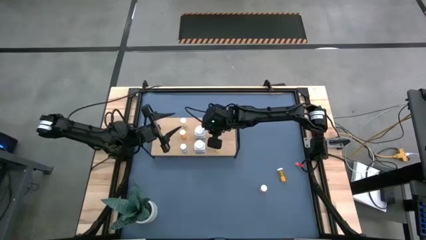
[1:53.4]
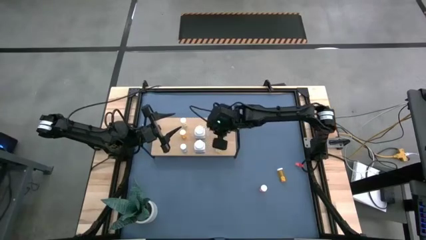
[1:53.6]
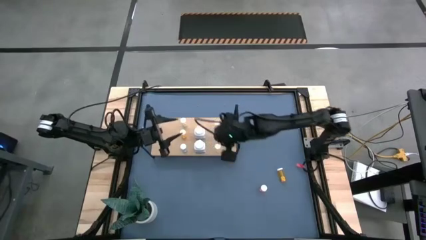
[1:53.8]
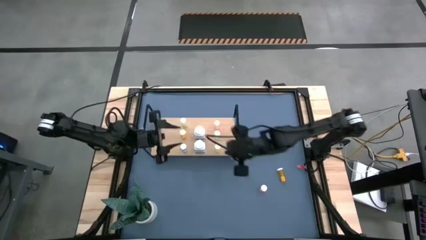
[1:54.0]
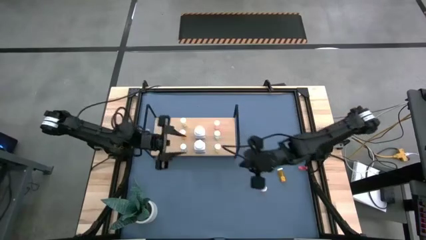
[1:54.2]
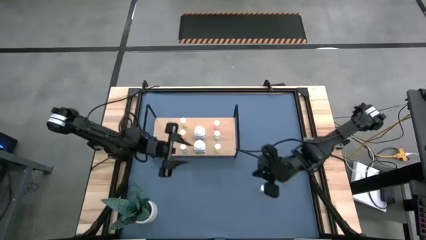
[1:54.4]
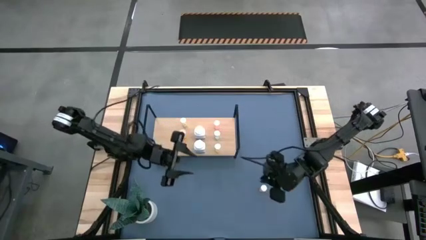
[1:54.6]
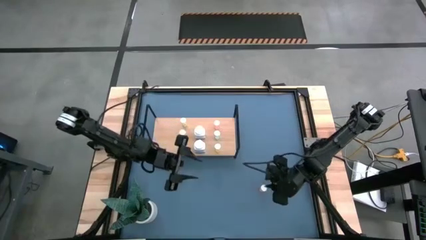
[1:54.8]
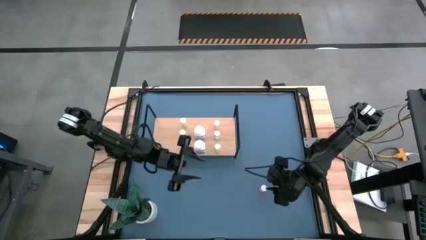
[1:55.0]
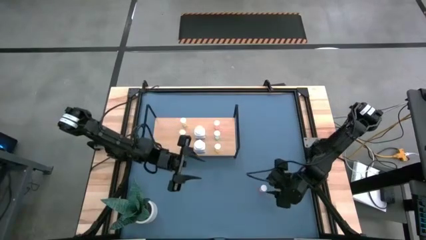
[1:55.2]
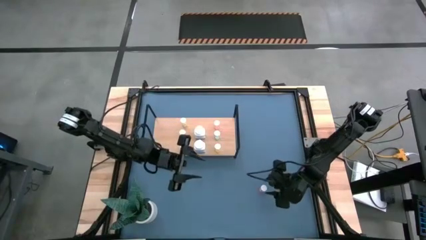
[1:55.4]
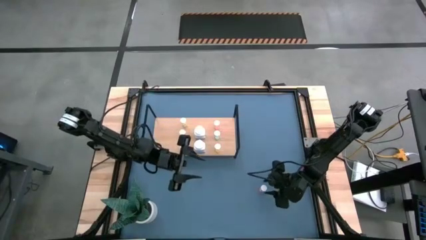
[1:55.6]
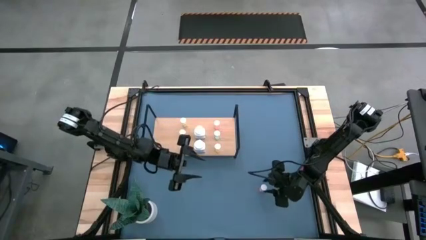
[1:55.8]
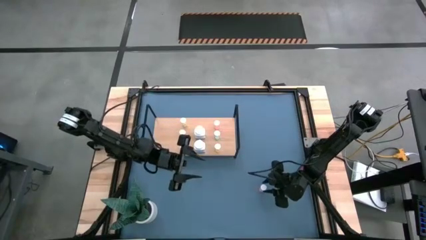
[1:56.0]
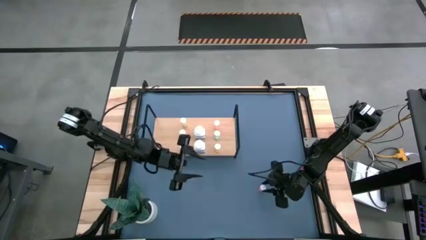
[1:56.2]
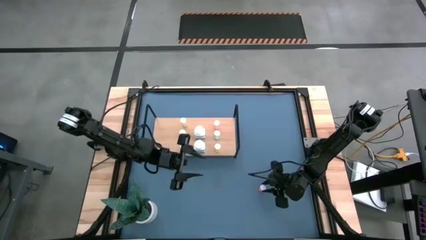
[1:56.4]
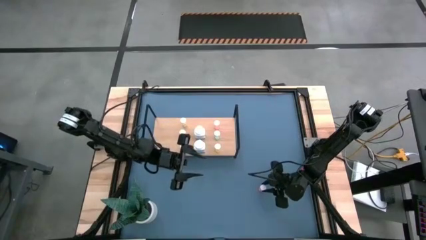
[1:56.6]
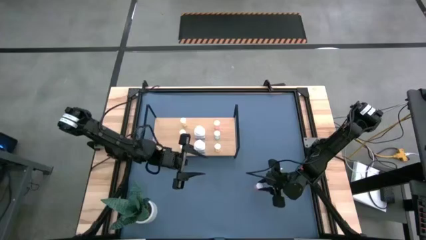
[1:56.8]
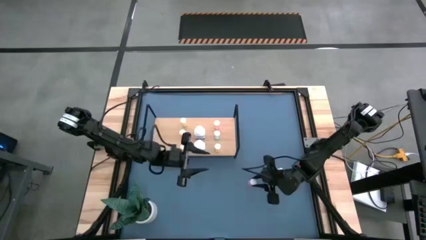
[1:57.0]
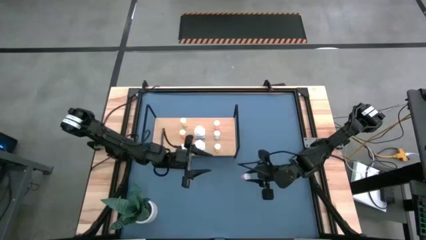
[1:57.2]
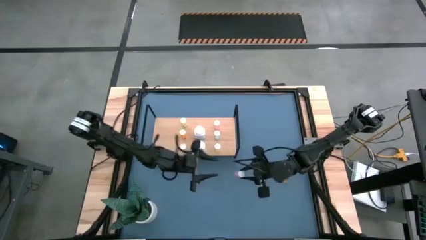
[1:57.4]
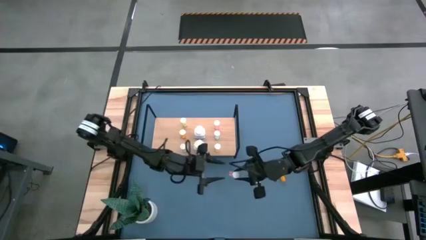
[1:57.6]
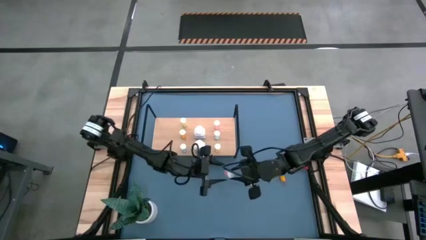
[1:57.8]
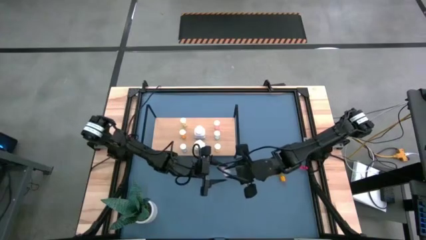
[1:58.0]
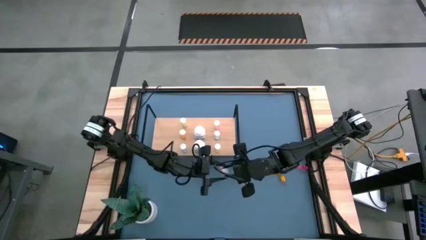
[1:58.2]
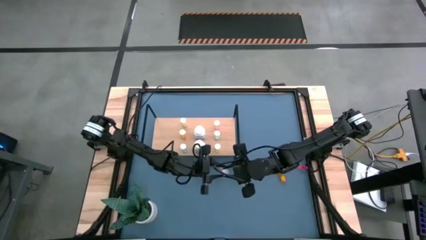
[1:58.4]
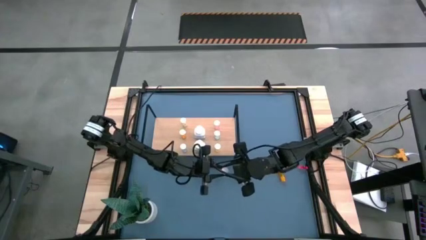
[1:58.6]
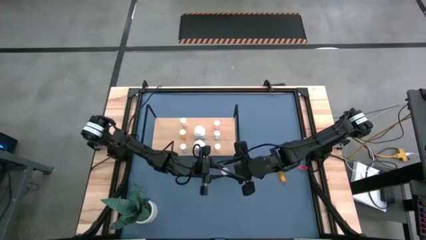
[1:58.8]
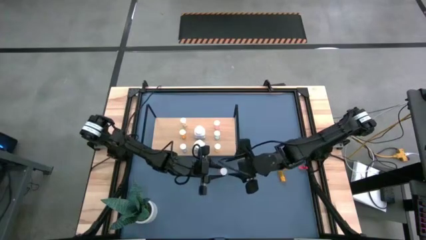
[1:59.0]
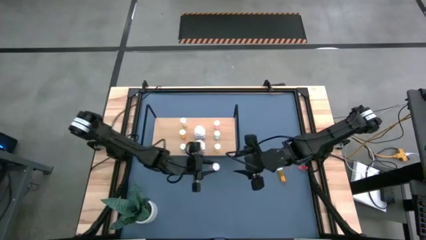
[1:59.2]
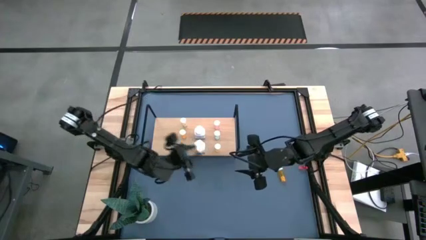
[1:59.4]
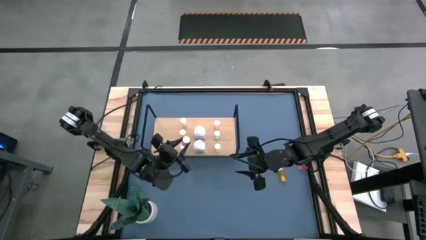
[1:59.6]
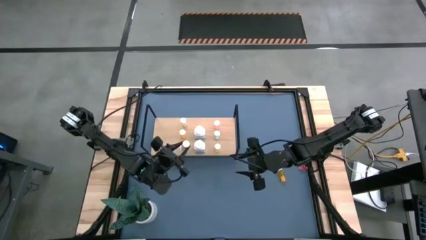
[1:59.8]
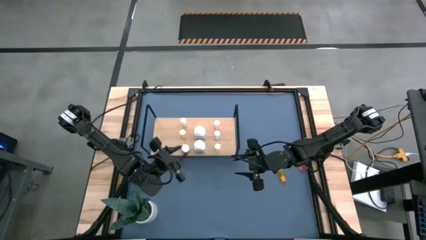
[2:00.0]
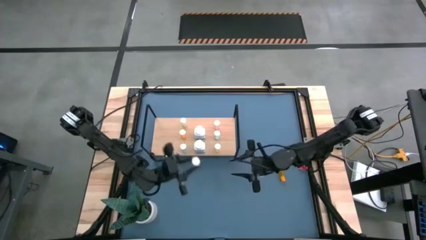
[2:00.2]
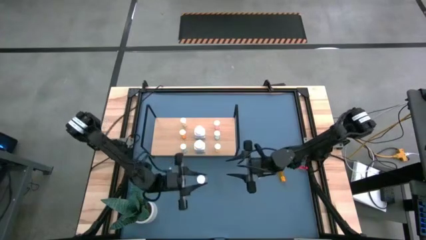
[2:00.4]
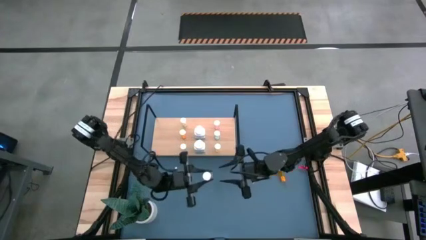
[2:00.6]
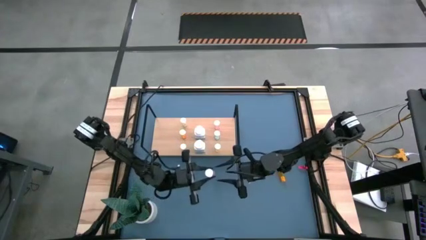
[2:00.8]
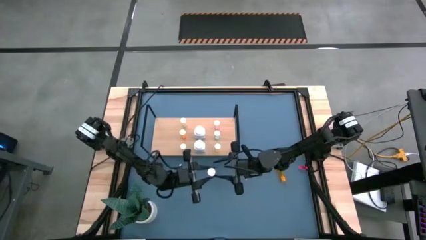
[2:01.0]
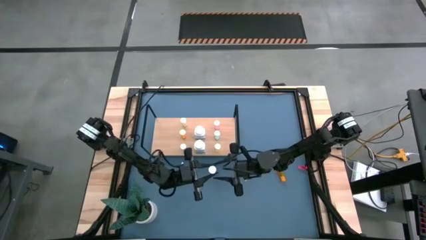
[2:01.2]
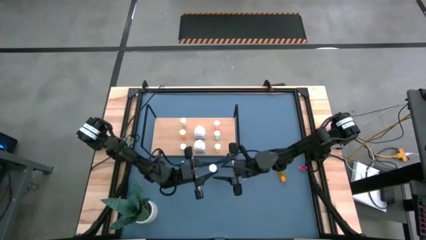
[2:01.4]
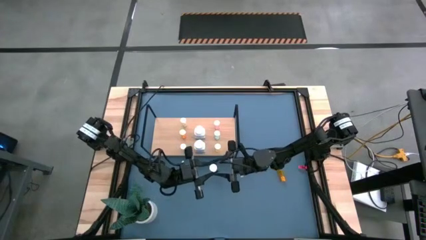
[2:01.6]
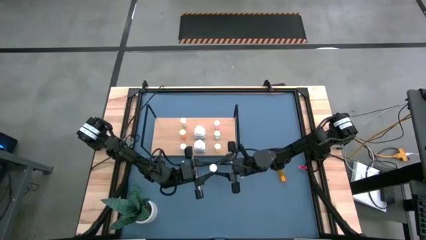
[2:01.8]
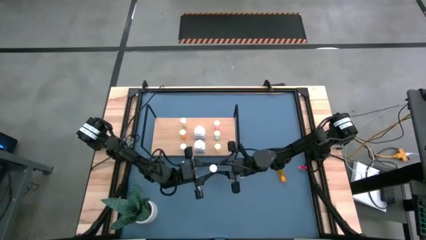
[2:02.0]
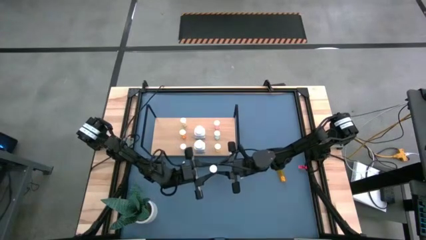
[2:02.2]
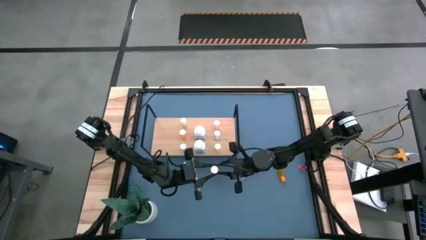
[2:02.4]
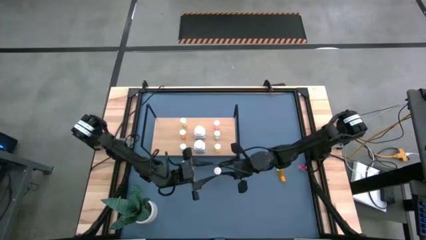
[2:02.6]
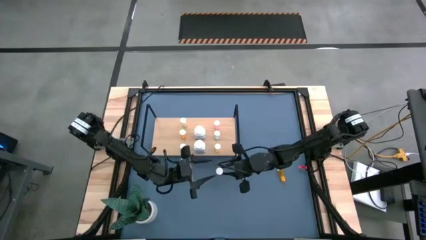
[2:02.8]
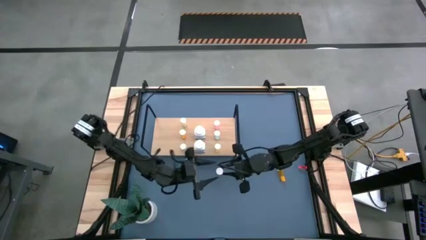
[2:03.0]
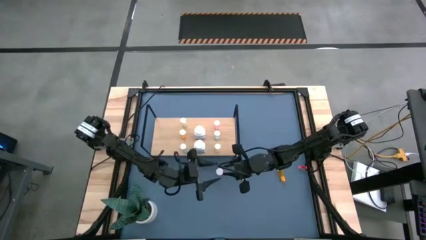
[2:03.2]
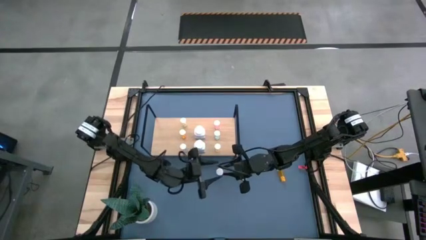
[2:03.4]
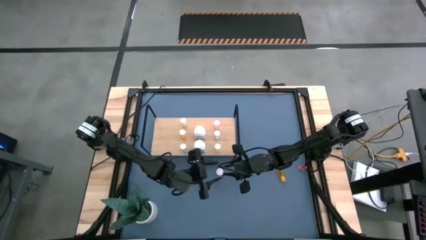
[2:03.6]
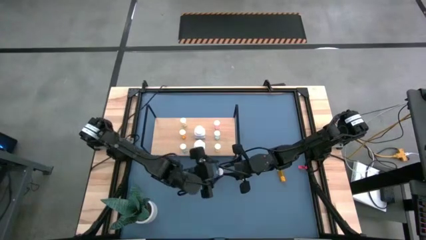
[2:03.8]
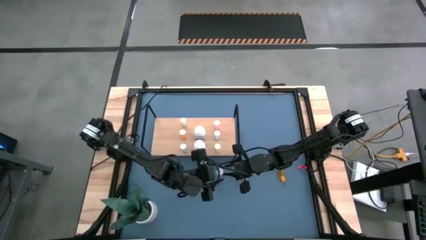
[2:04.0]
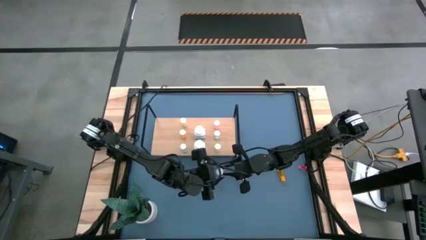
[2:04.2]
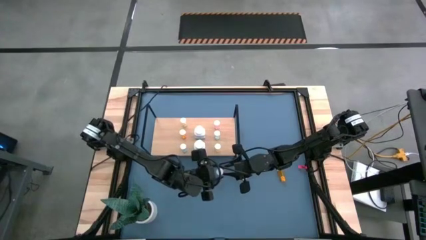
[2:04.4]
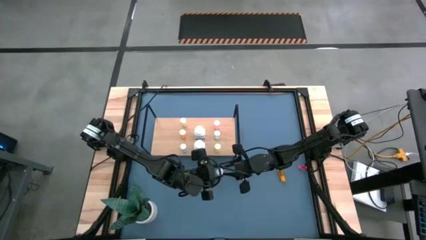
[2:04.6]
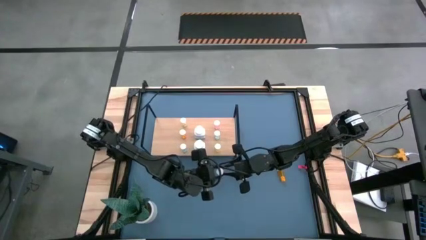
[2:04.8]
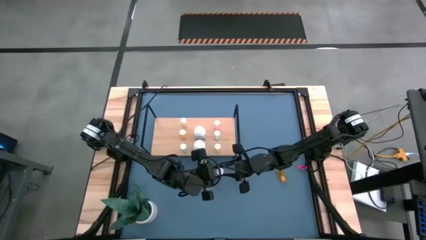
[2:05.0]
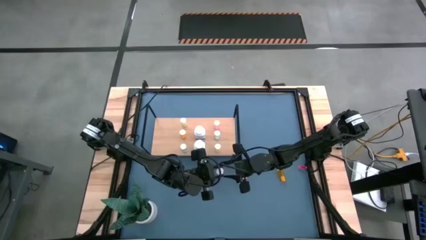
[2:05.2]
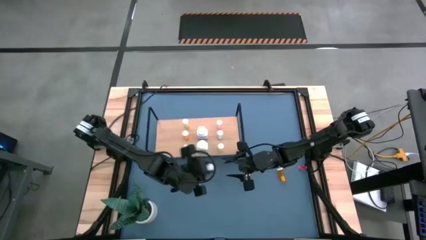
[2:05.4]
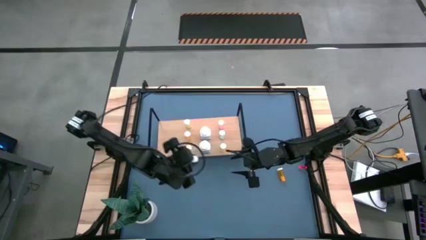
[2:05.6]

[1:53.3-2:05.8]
Task: Pick and place medicine bottles onto shelf by color
Put the pink pill bottle on the shelf

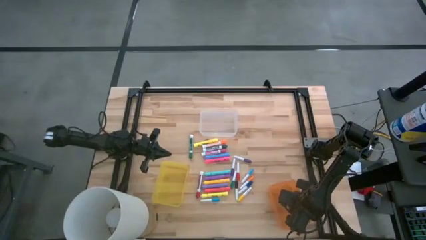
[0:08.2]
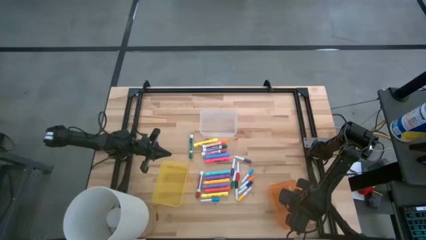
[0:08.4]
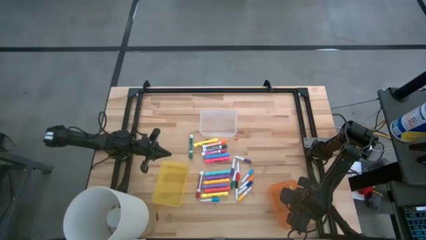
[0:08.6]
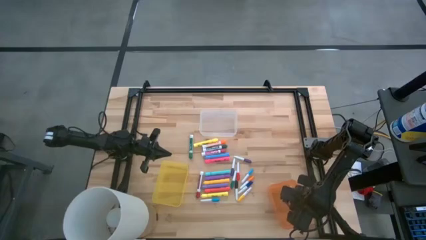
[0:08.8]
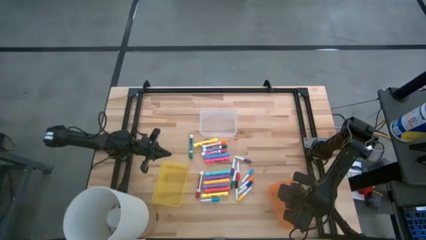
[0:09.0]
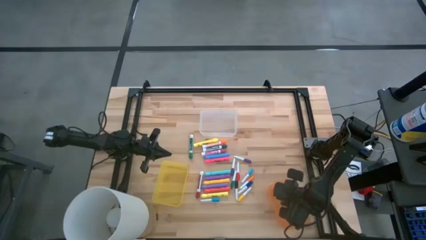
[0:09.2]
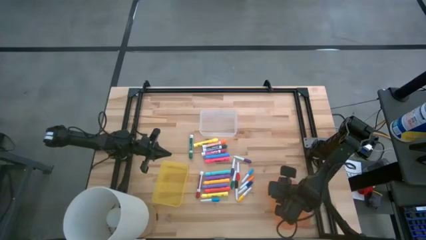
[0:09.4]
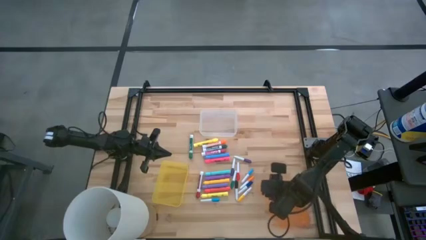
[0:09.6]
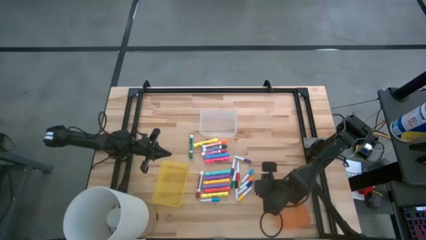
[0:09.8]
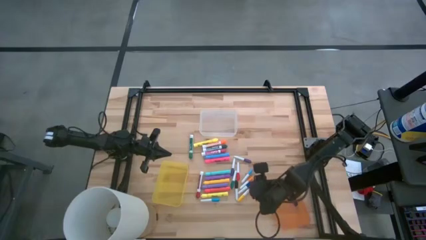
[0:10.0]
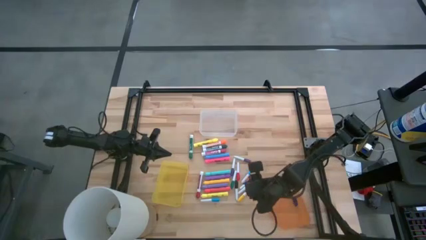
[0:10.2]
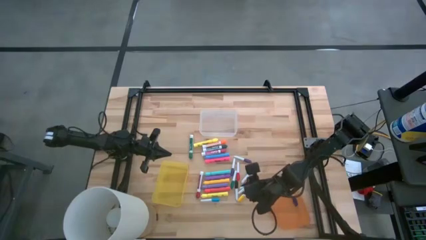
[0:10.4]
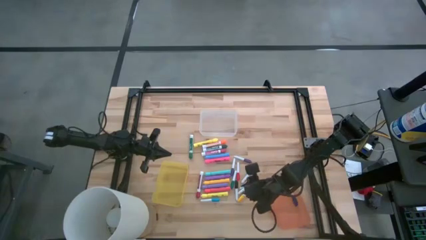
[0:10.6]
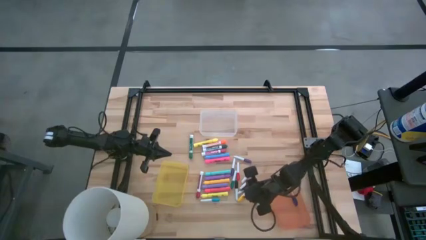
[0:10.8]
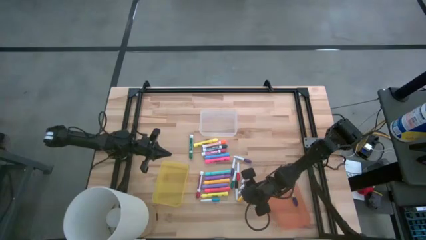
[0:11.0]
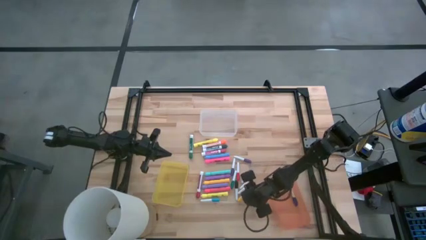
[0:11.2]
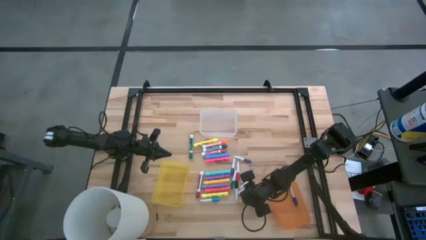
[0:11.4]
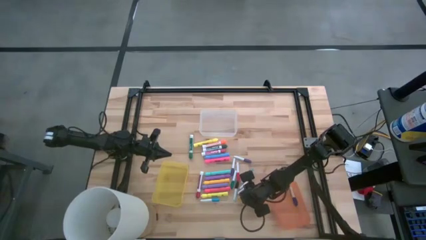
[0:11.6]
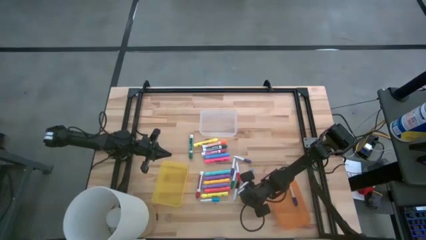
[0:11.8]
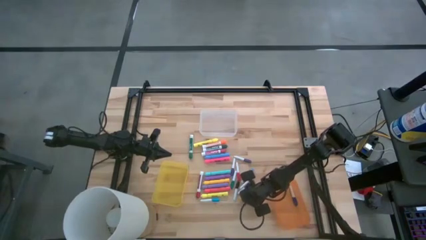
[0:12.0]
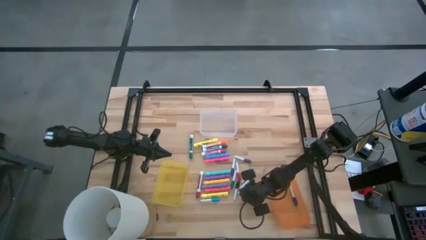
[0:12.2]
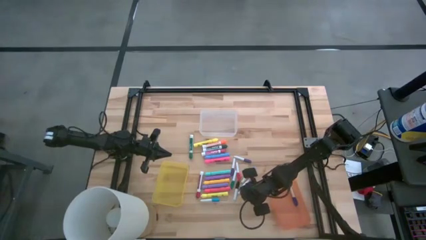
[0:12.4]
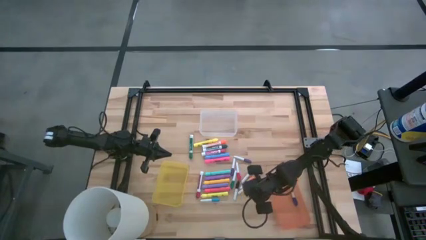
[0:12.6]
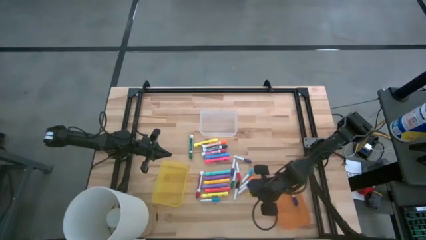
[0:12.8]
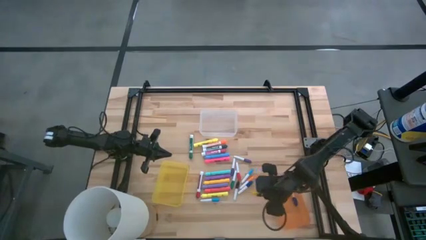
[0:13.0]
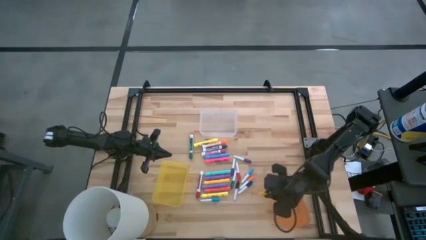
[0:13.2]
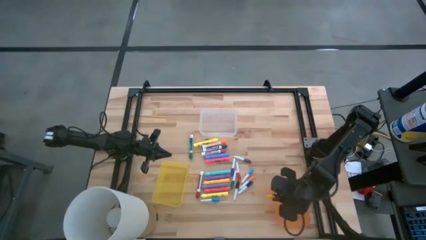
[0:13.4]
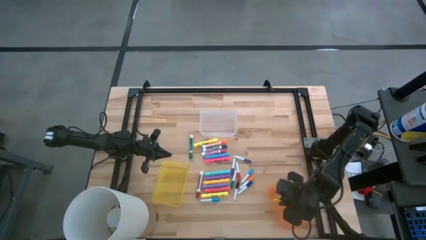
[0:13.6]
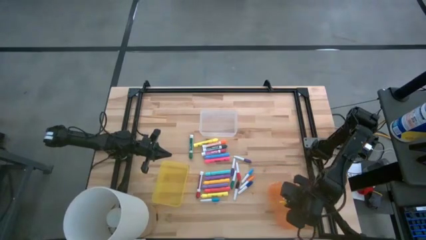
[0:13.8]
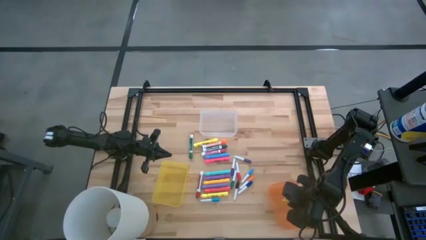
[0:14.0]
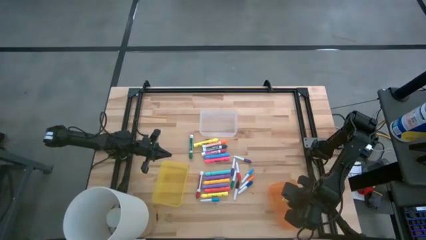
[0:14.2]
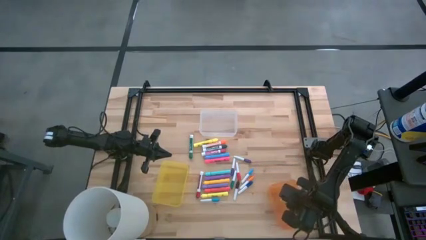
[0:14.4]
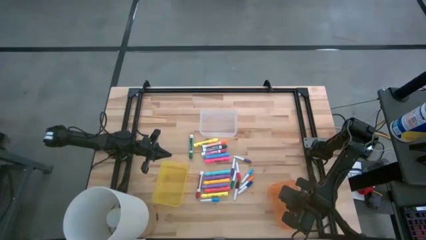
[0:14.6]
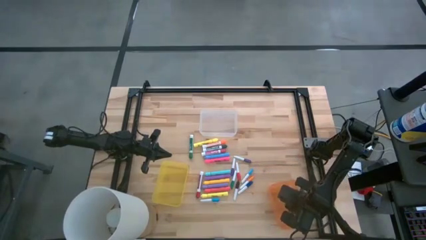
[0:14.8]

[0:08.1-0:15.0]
Task: Pick & Place Markers
Put the small yellow highlighter pen into the orange bin
